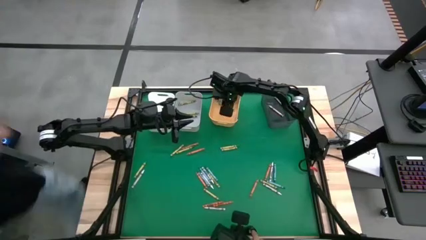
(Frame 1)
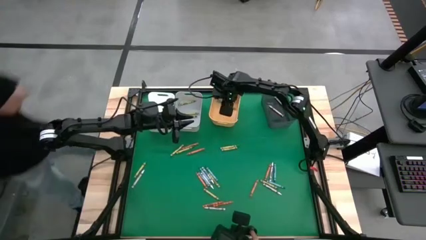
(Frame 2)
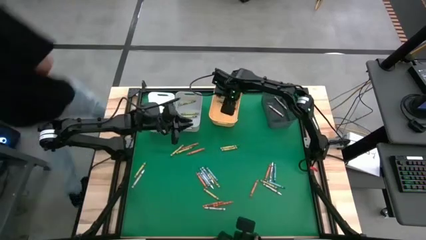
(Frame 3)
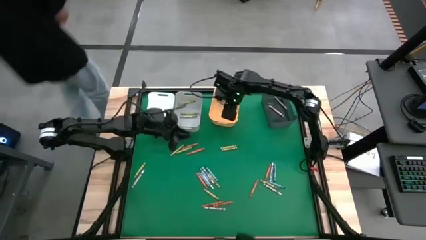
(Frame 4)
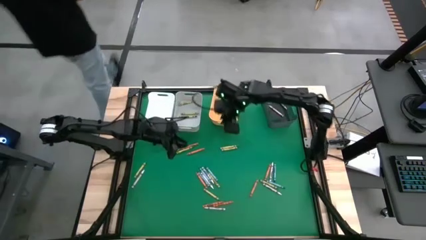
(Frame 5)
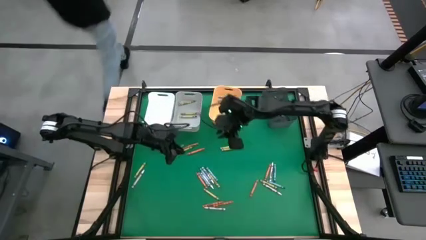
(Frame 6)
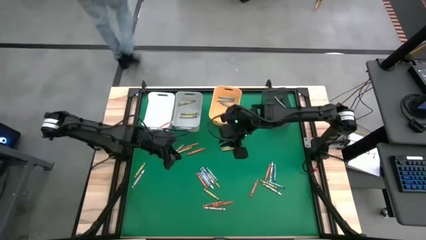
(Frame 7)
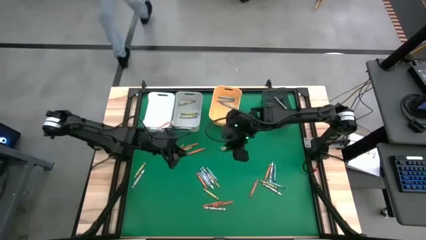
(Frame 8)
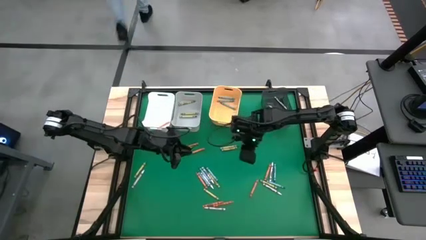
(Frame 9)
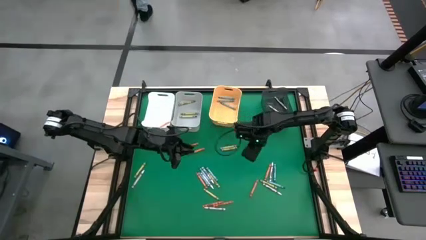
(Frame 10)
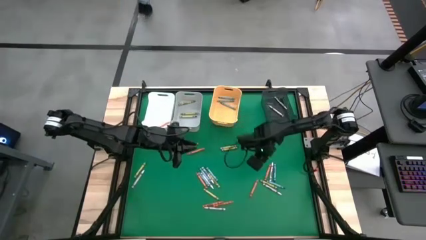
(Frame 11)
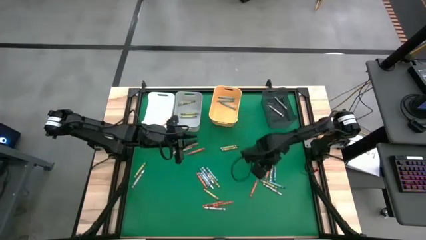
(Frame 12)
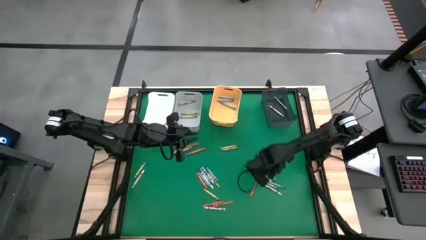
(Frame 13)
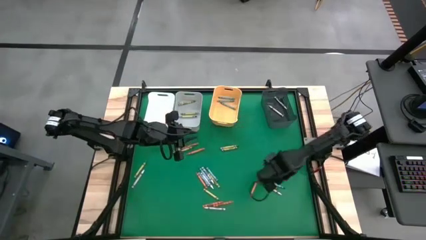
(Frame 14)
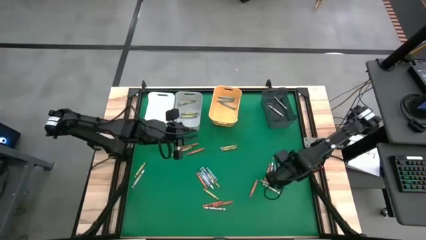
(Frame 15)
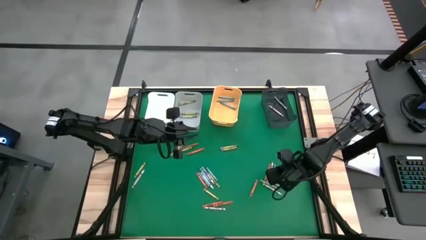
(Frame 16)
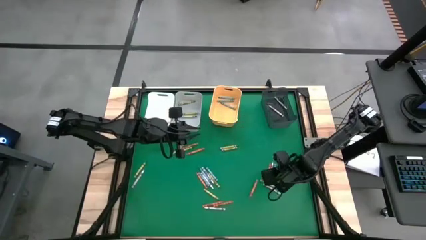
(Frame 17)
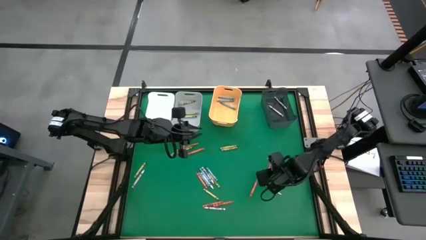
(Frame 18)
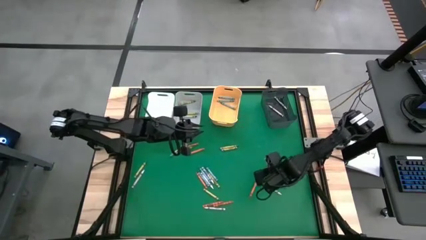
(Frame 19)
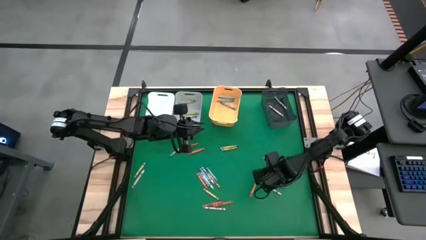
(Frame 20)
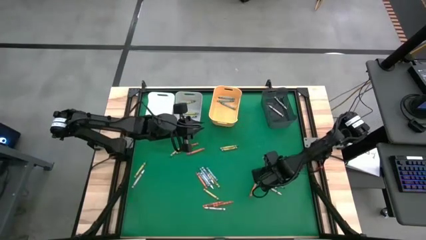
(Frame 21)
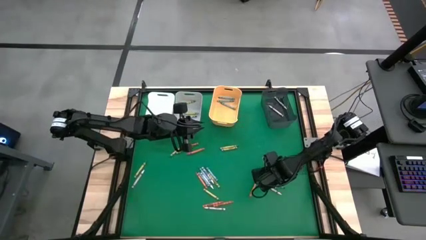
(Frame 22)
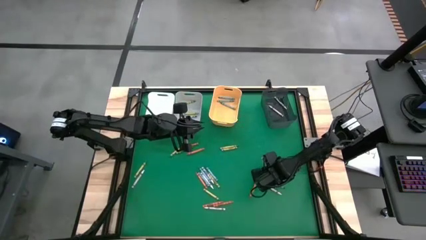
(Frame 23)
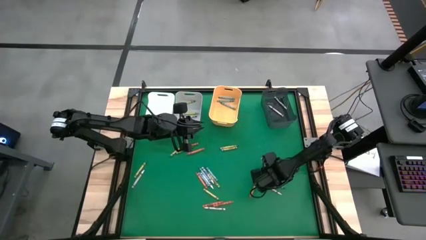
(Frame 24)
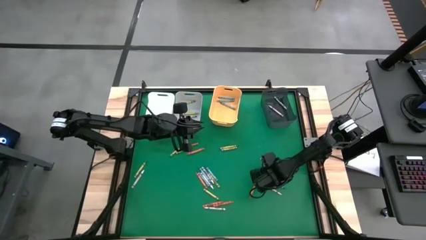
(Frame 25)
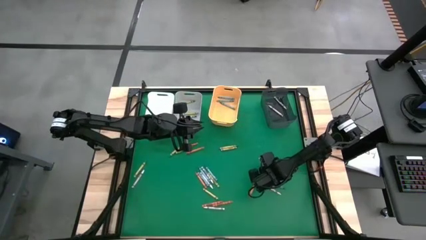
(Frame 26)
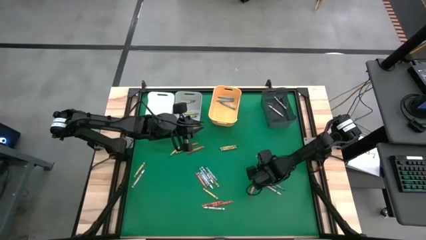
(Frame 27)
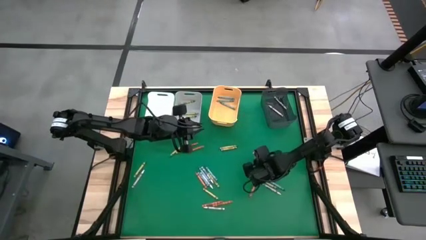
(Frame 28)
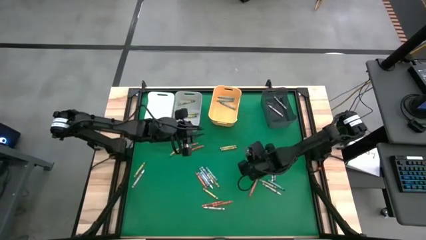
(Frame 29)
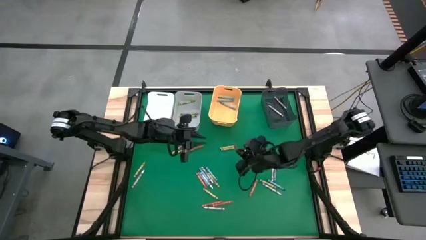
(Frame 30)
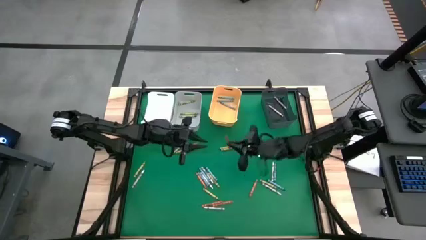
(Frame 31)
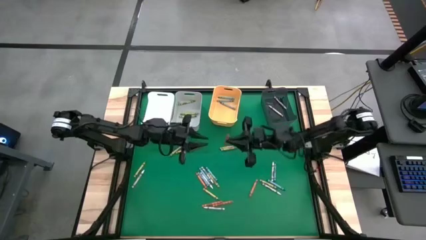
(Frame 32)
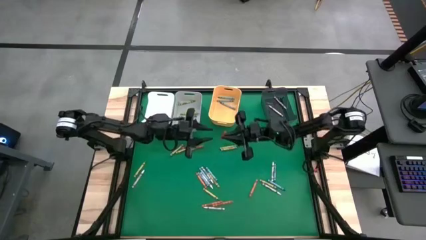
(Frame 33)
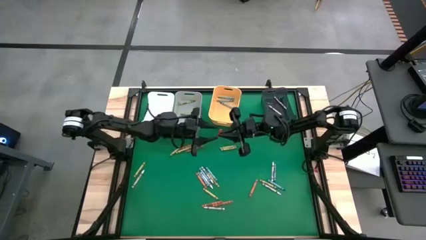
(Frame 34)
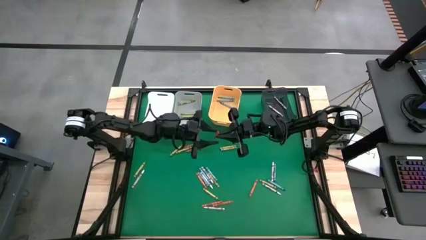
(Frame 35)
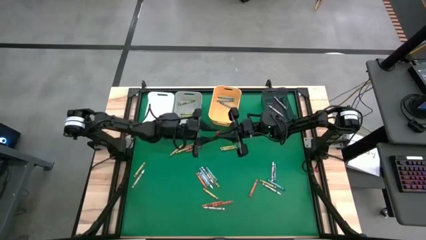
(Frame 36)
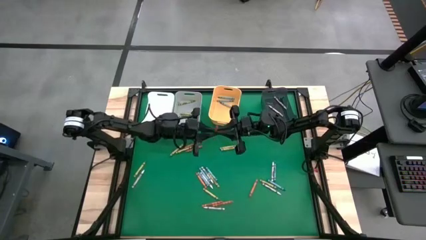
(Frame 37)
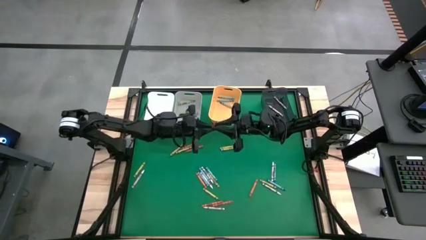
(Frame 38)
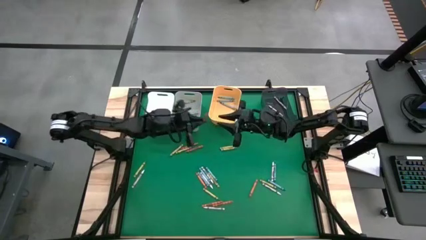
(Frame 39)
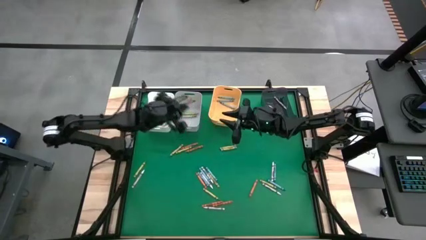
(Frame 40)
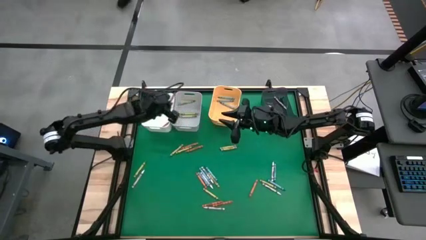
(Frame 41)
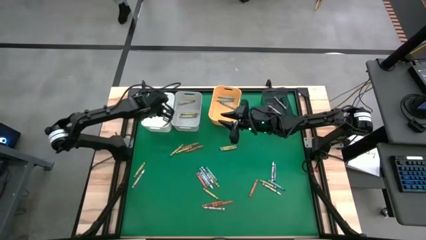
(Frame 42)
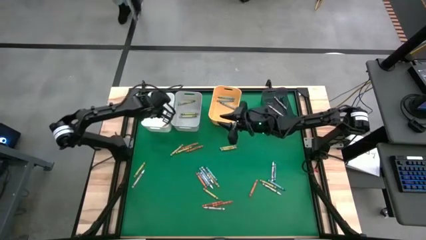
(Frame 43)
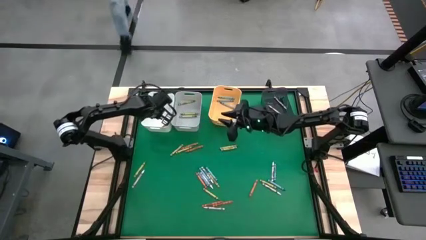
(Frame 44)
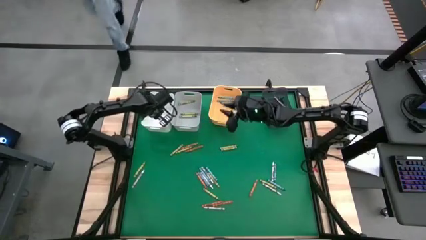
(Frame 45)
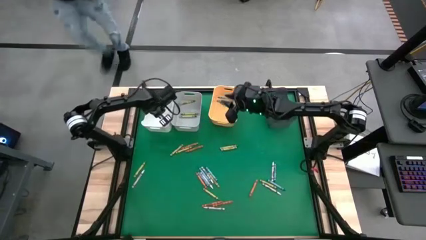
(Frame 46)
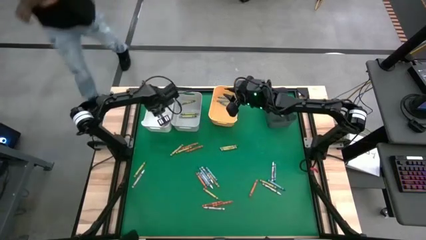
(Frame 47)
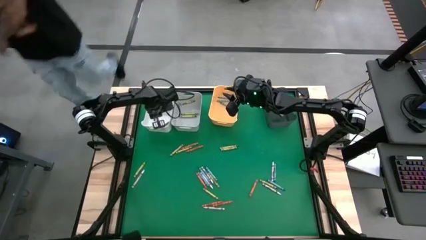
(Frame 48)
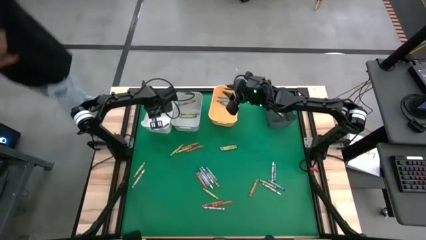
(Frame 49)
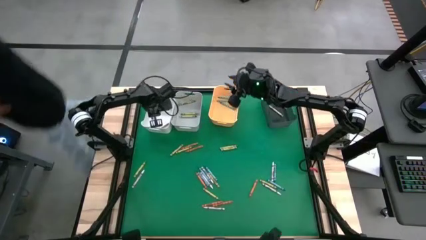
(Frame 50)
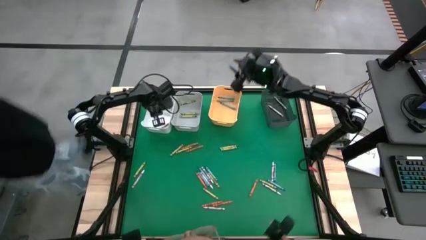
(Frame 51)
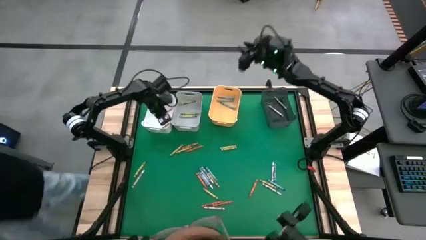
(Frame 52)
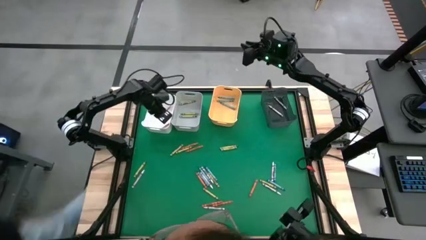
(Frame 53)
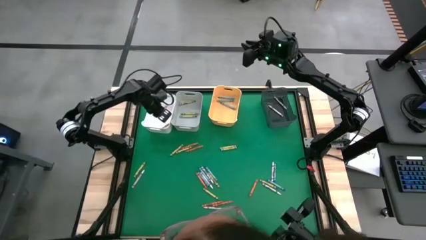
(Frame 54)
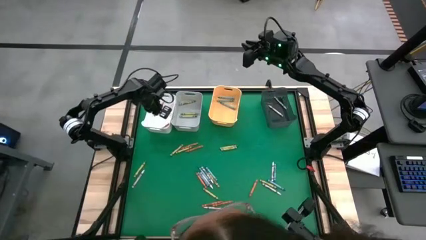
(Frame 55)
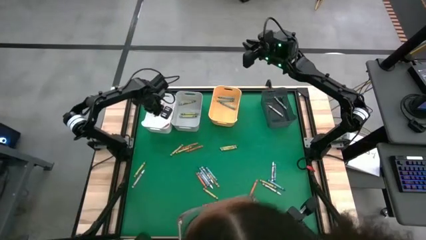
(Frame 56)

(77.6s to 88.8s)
Task: Sort crayons
Put the orange crayon into the white bin

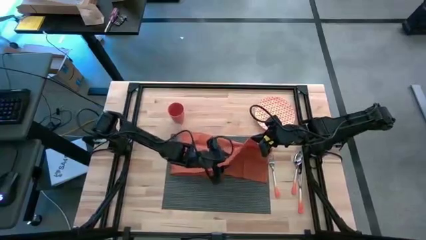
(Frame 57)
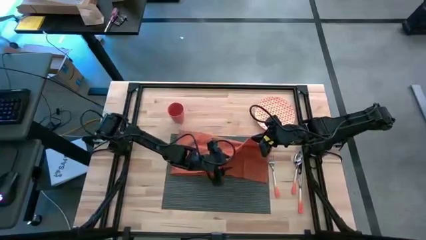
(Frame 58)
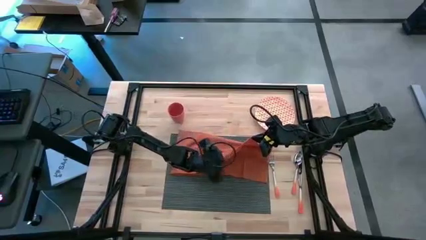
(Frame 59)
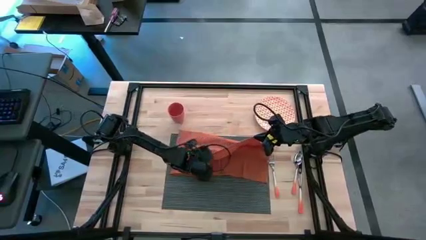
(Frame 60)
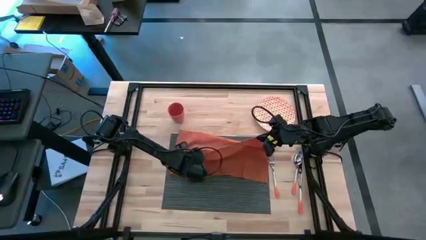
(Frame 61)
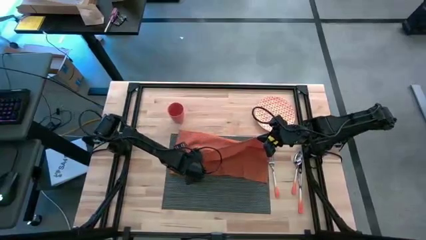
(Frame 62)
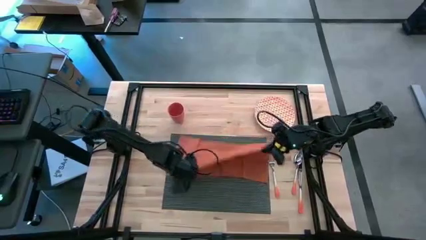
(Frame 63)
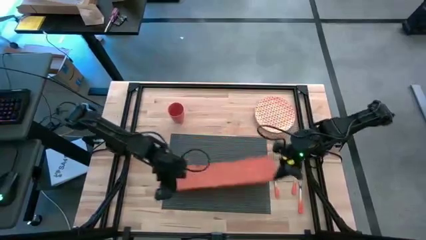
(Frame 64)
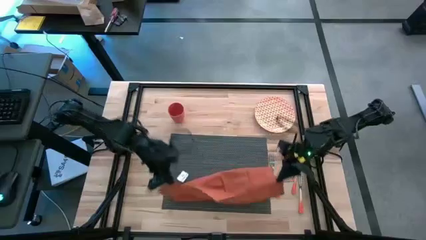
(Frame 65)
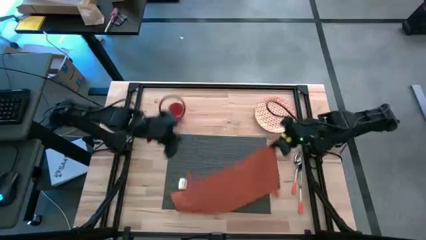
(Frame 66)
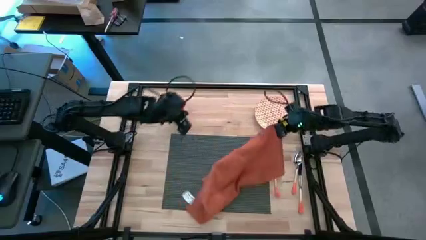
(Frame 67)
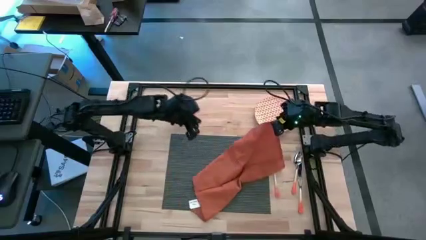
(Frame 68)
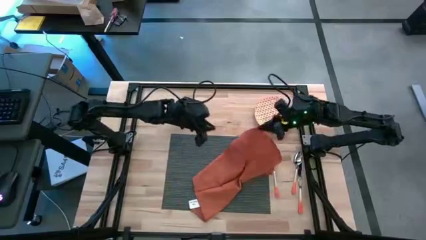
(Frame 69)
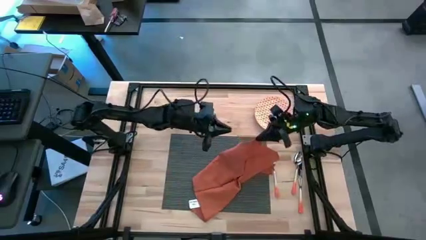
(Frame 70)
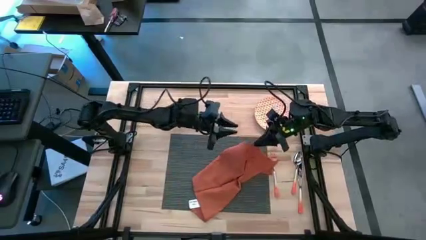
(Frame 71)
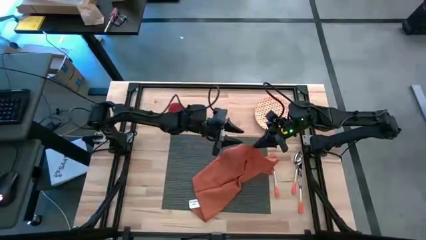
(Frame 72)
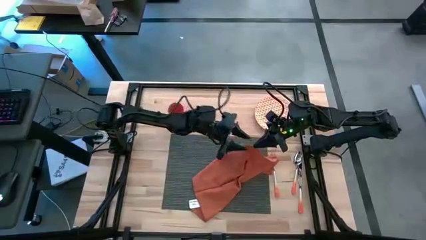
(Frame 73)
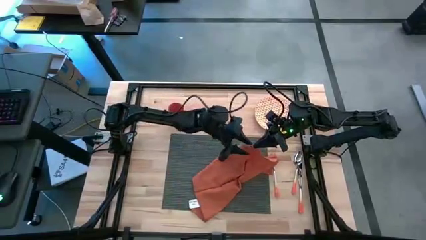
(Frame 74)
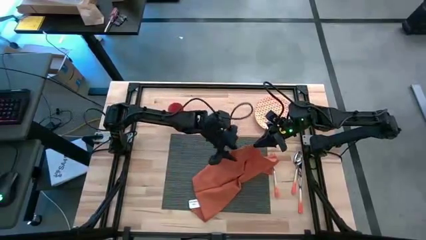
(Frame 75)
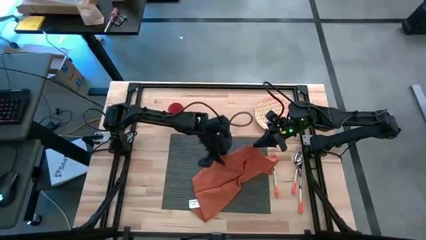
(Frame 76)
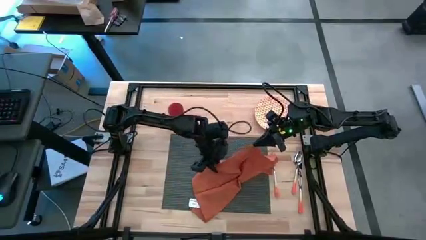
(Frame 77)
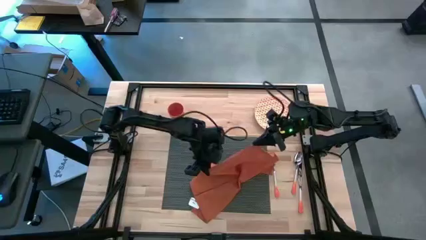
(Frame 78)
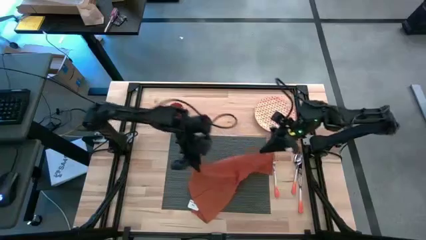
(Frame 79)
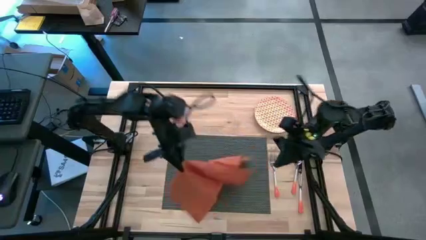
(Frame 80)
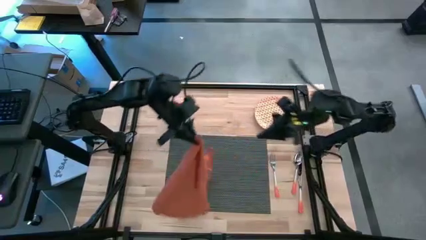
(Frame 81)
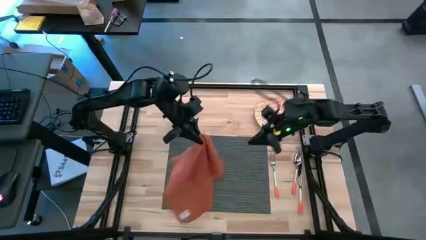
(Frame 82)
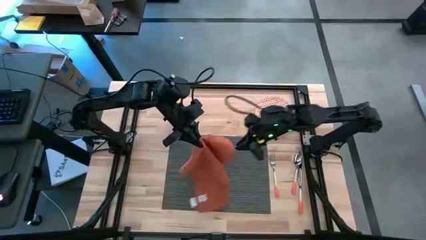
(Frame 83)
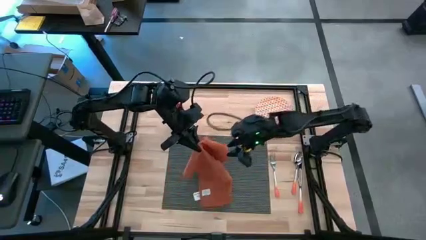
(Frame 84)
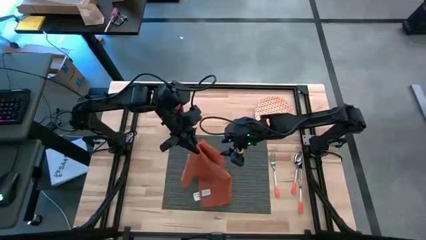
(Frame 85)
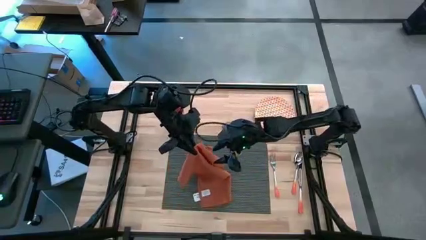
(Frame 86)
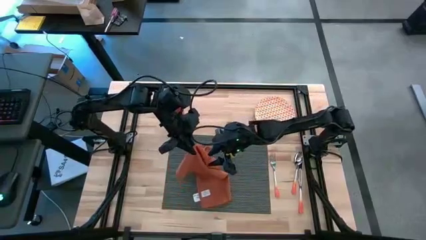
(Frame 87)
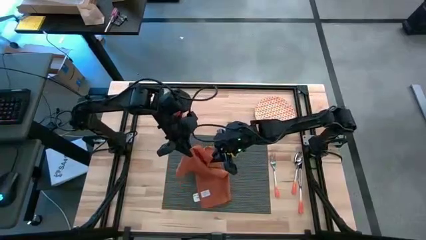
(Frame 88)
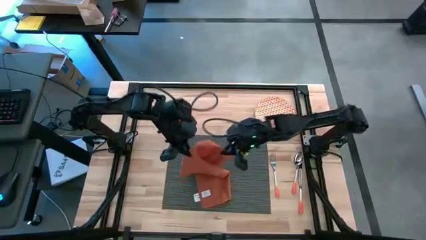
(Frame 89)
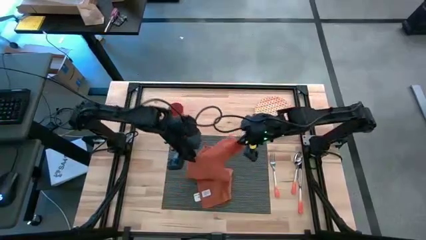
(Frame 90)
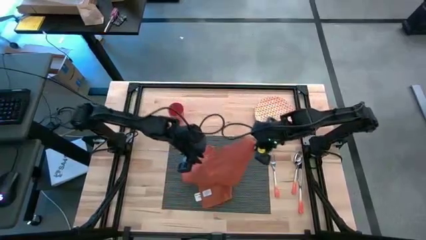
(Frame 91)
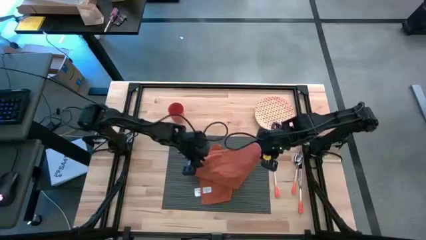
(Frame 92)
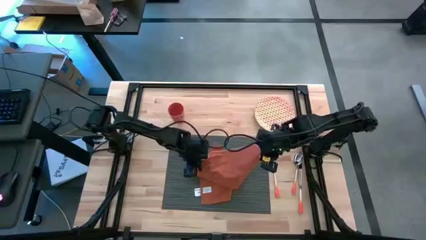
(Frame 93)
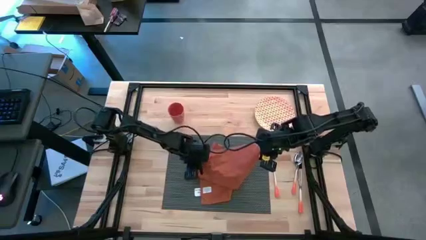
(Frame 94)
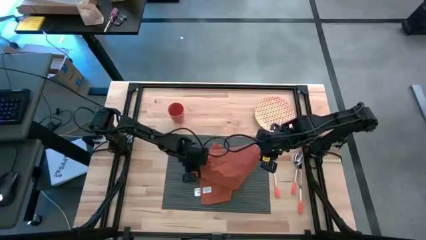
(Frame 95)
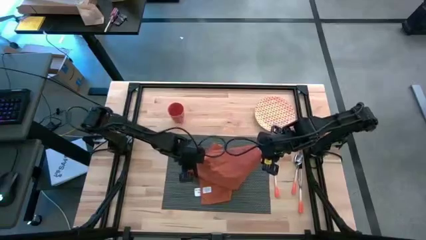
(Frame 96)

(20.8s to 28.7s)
Task: Set table place
Fold the orange table napkin
